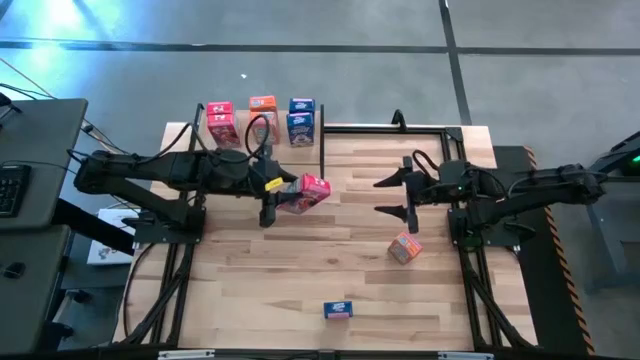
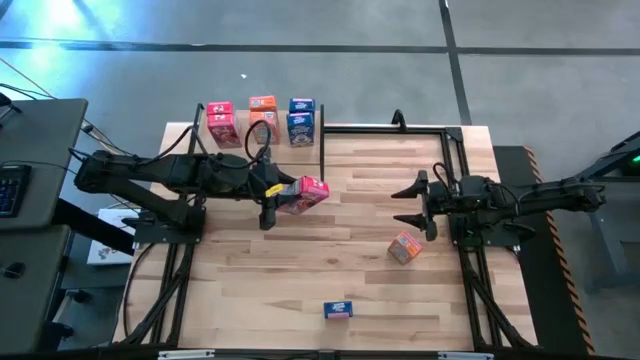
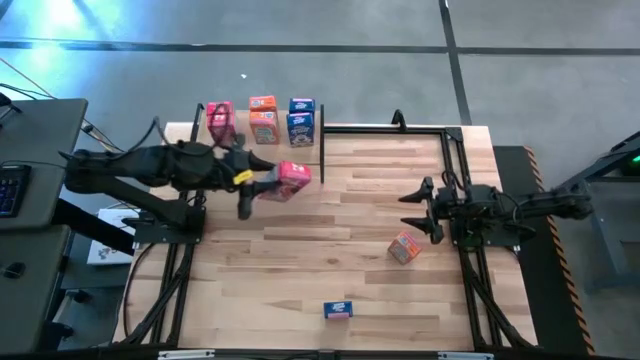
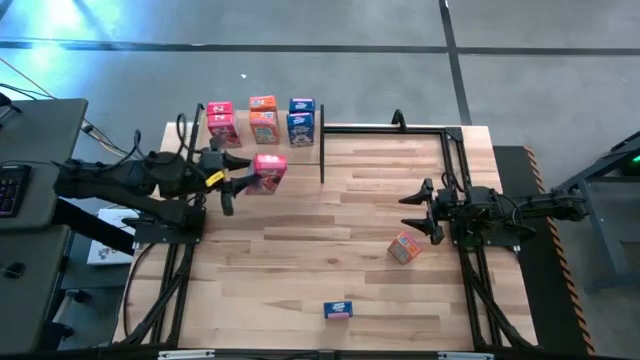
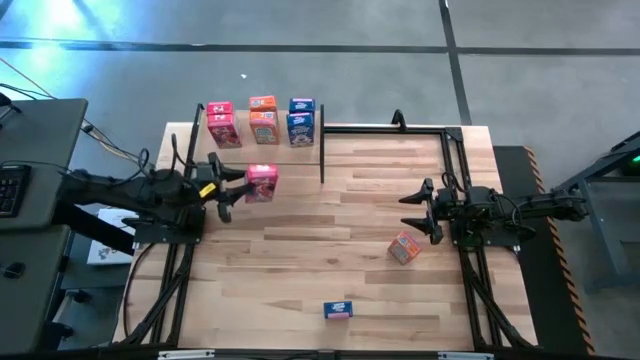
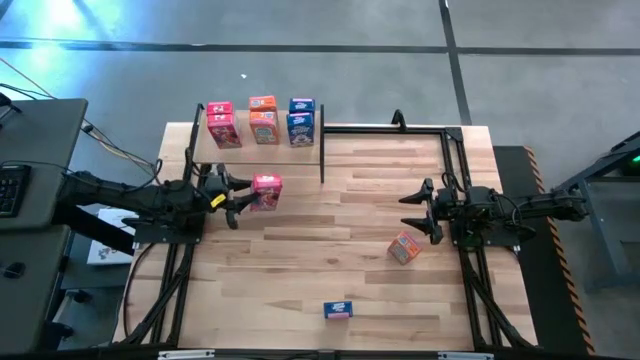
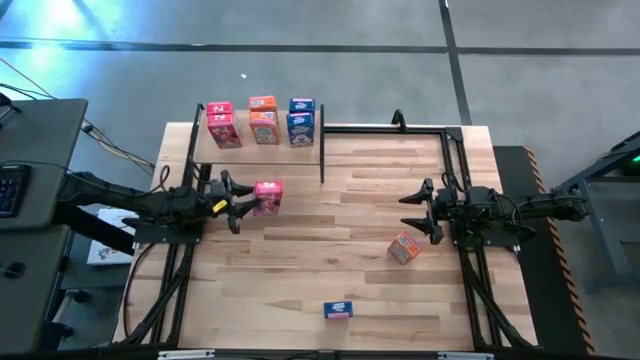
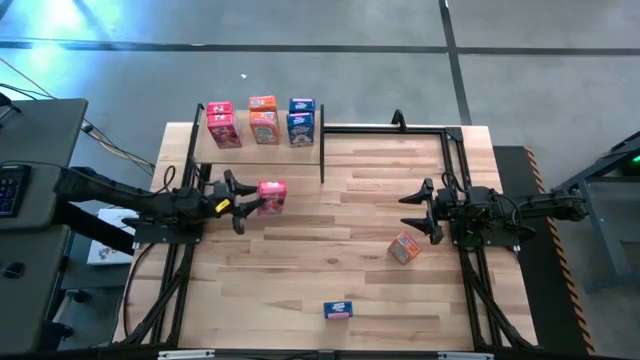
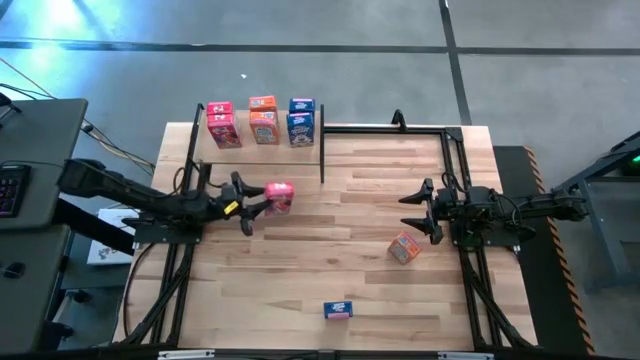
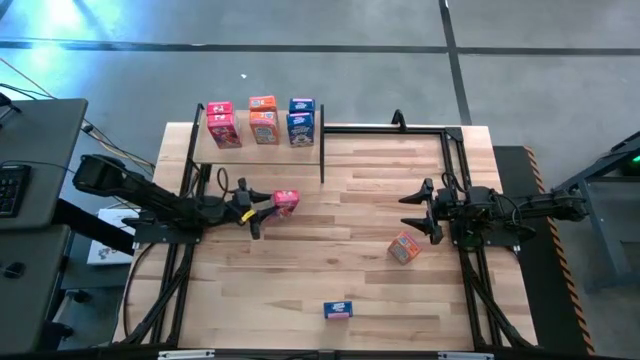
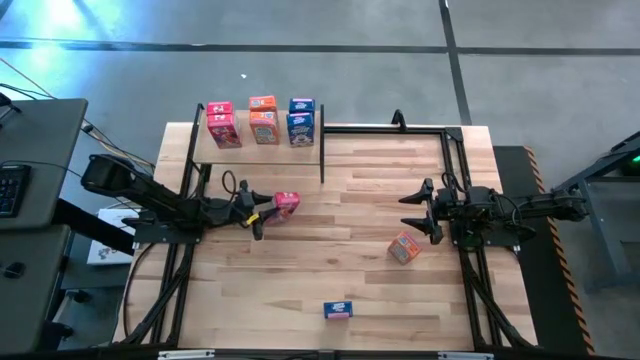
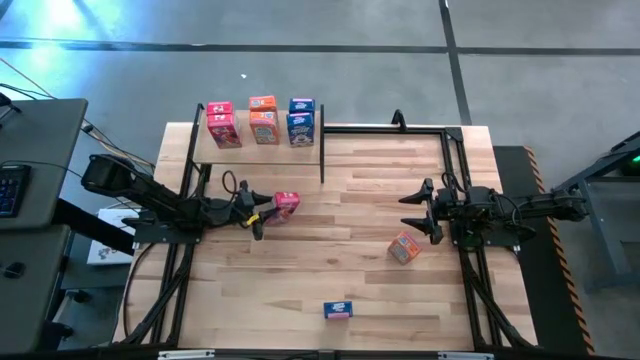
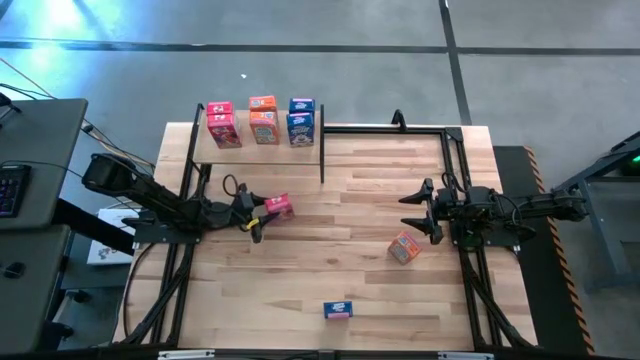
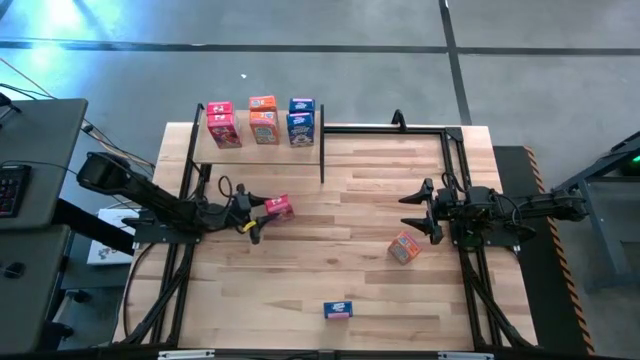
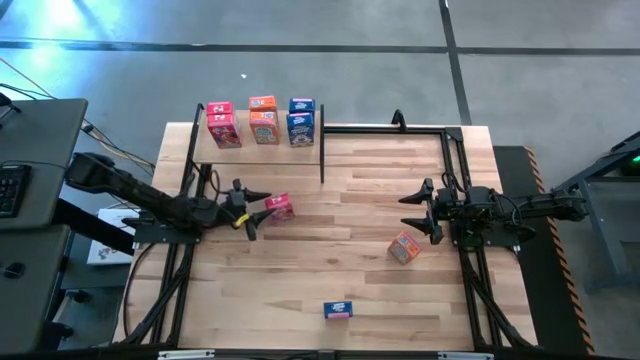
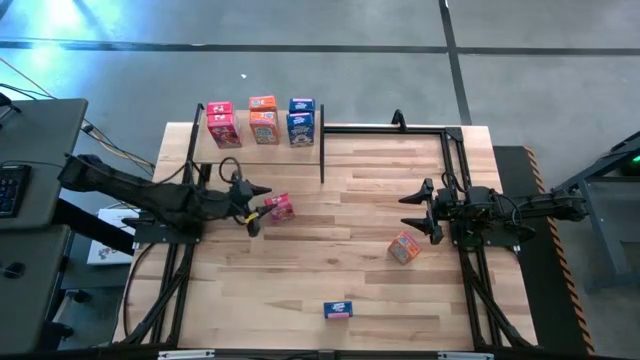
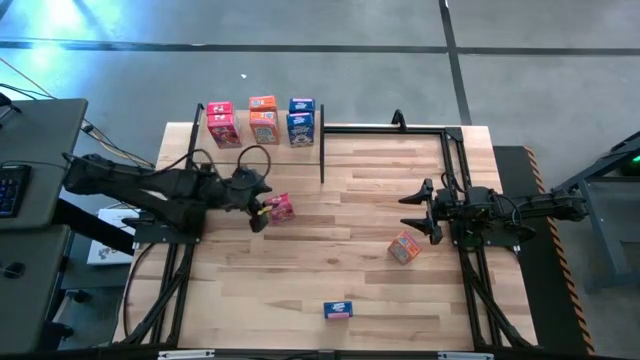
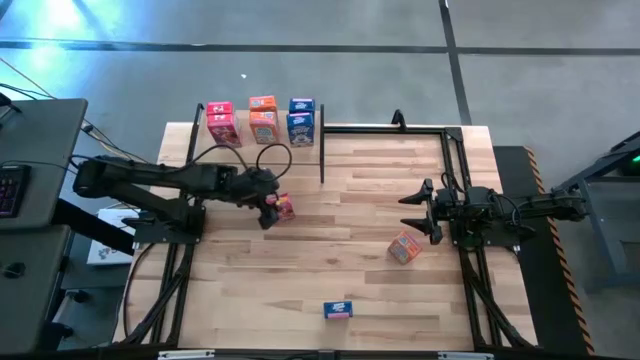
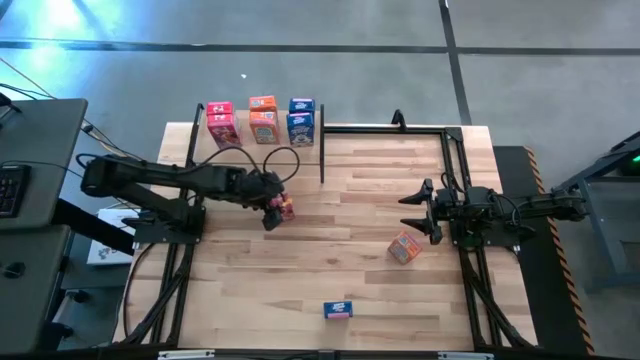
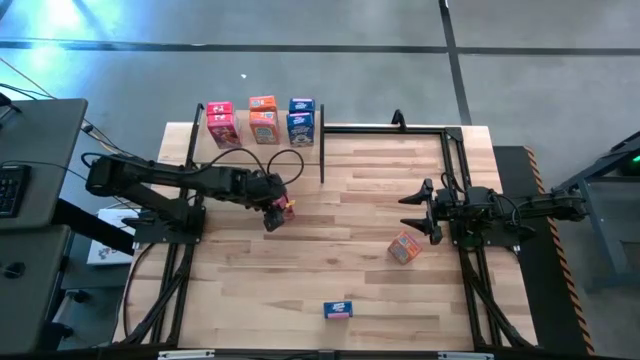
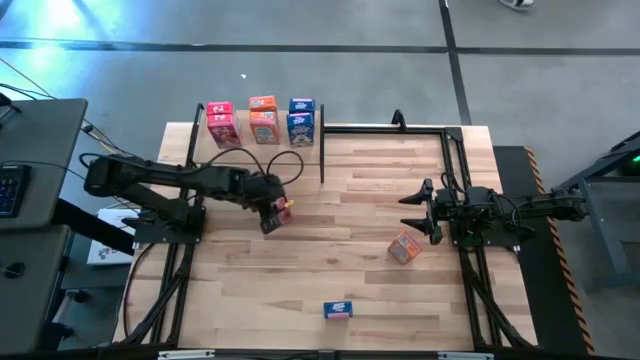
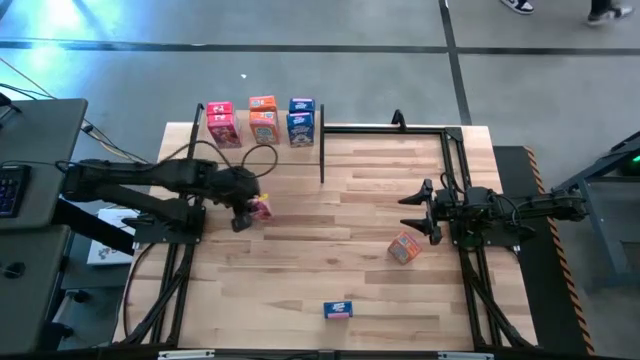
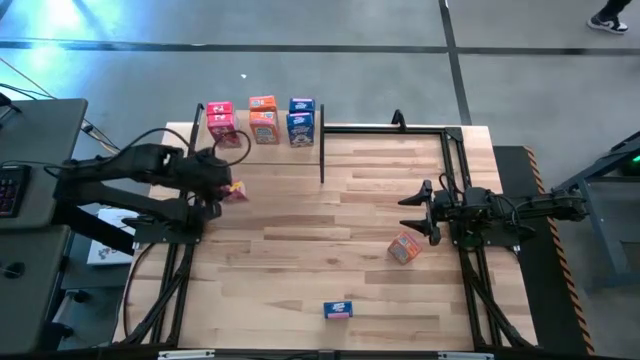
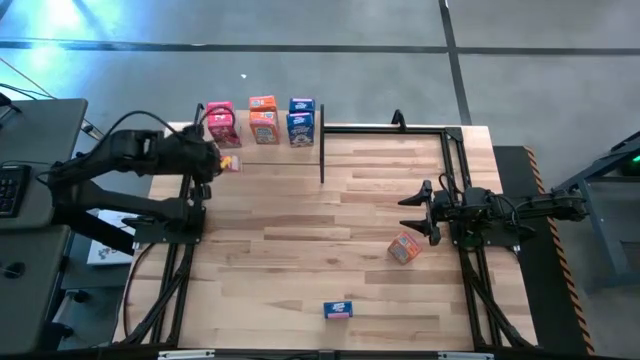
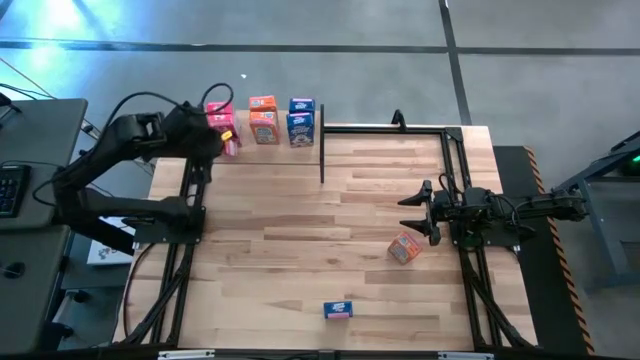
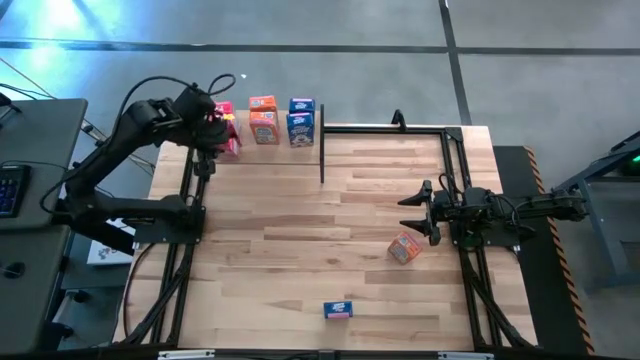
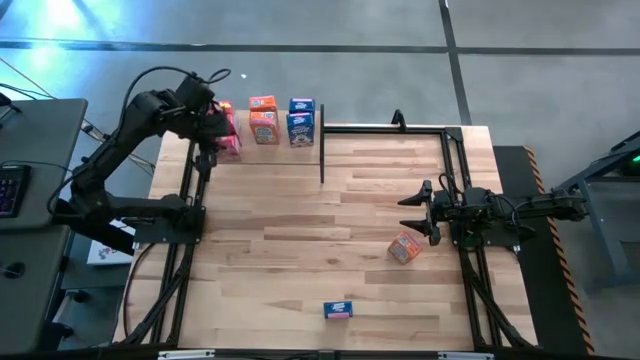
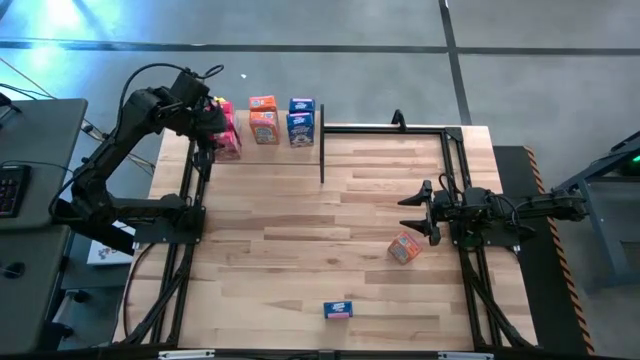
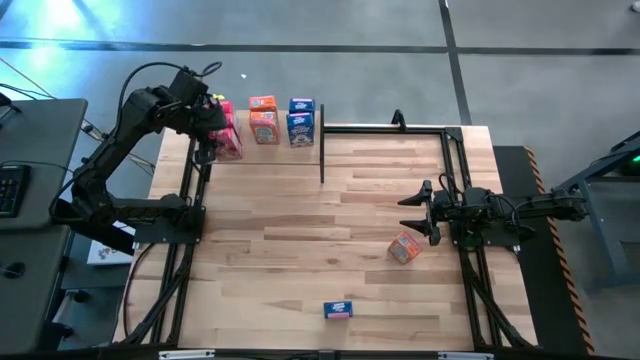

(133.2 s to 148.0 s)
Task: Stack cereal on shelf
Put the red cereal box on the the shelf aligned with the other red cereal boxes

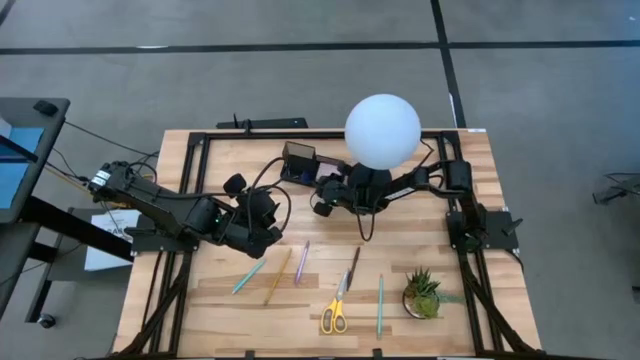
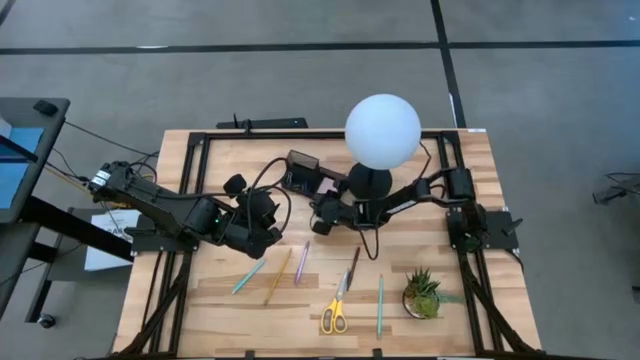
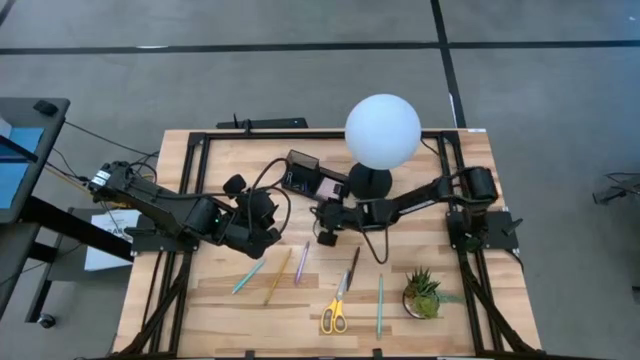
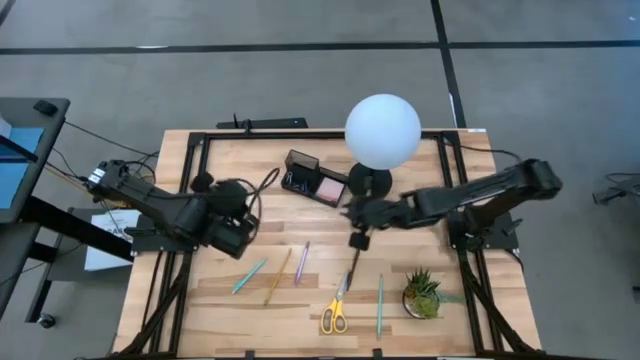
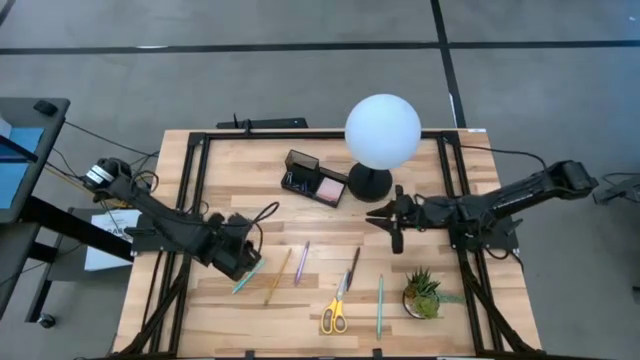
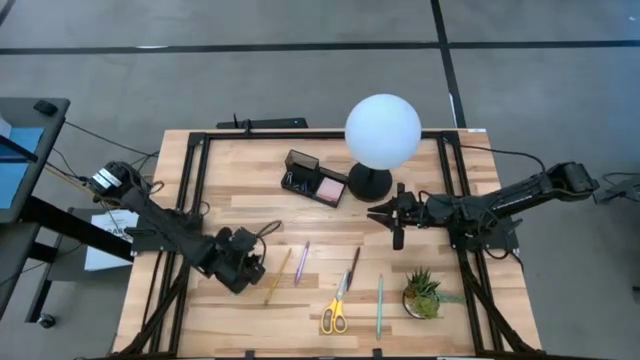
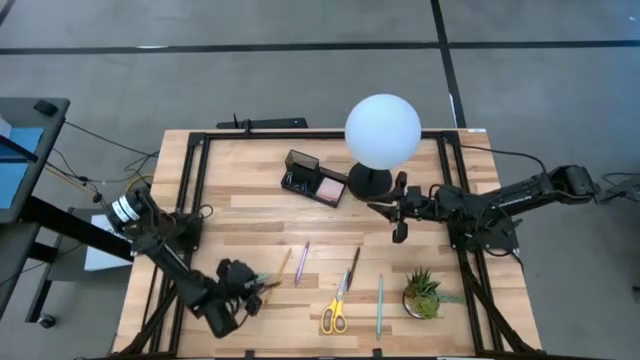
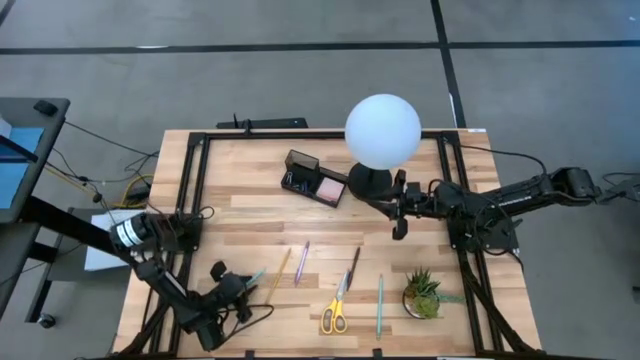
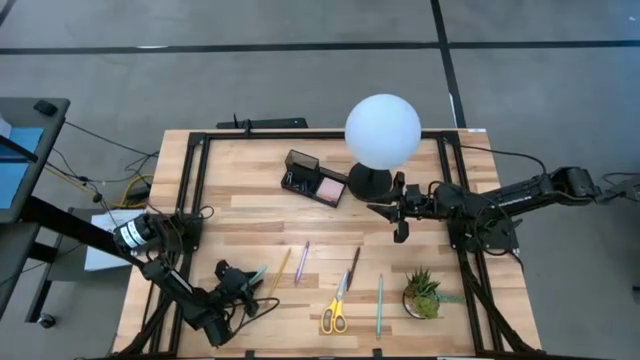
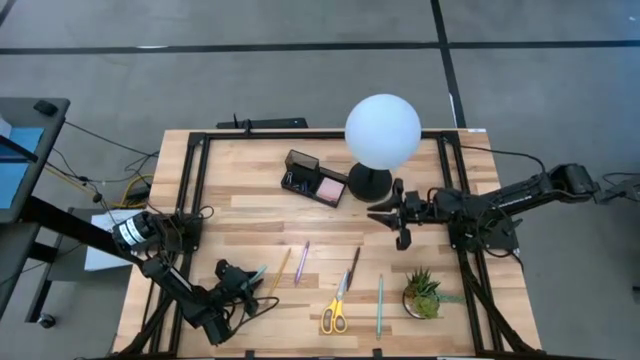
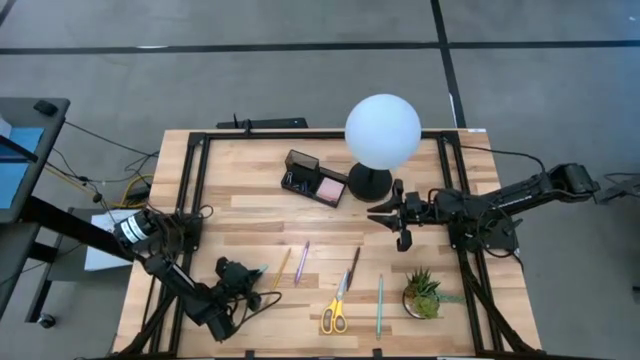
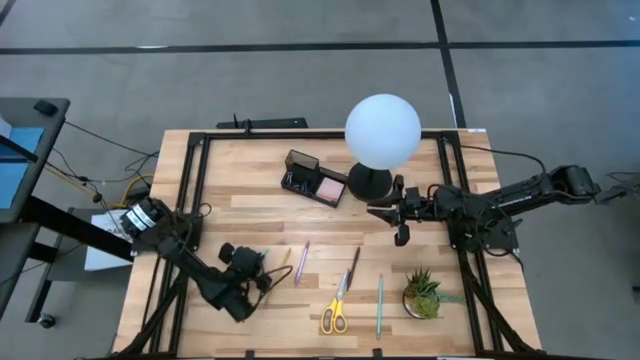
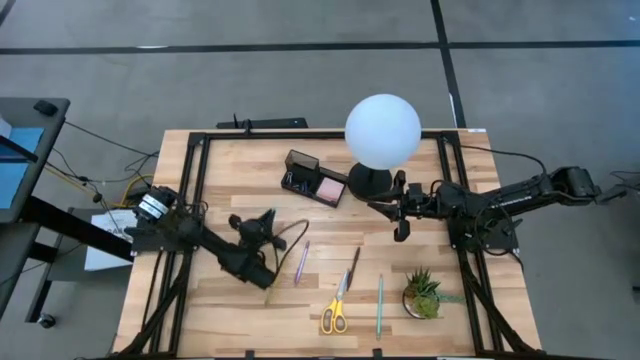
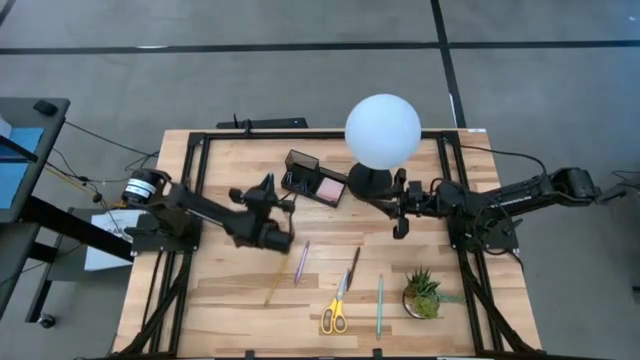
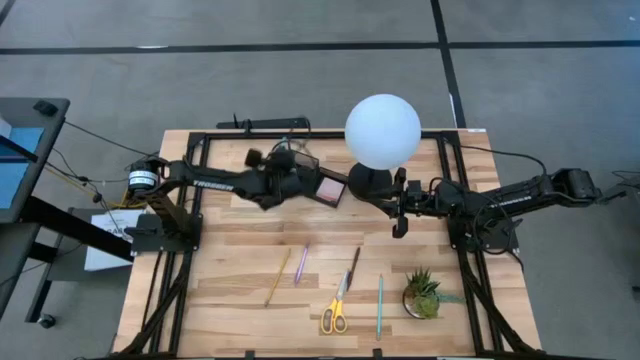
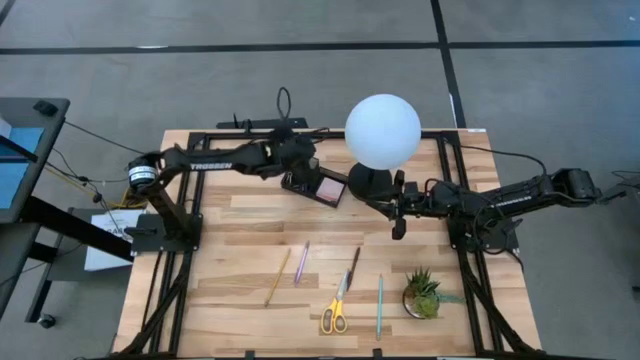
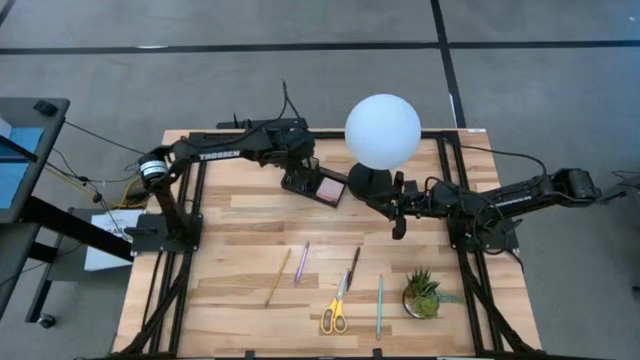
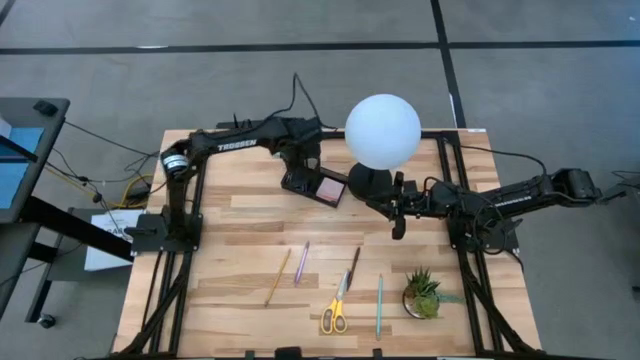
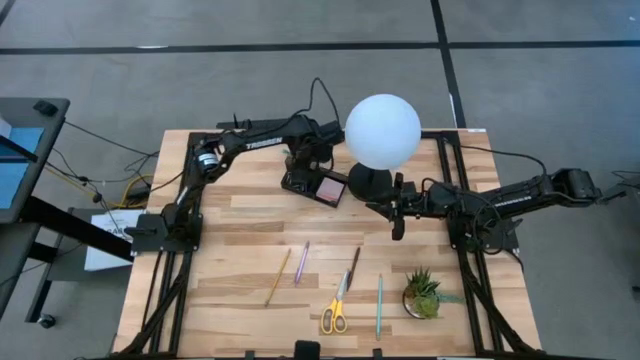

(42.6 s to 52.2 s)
Task: Pick and place office supplies into organizer
Put the blue pen into the black desk organizer
